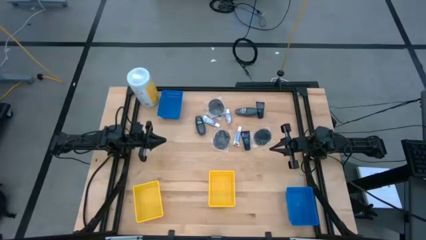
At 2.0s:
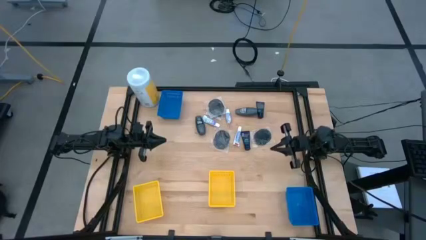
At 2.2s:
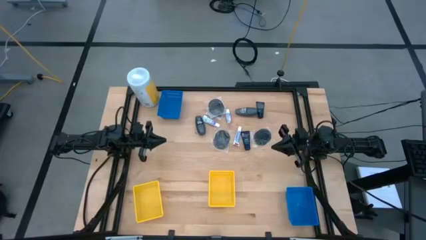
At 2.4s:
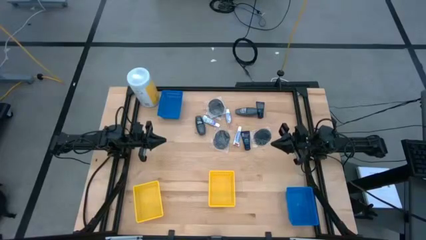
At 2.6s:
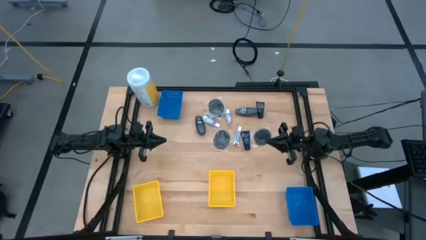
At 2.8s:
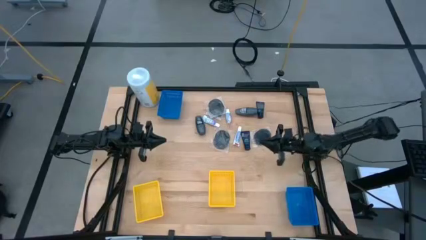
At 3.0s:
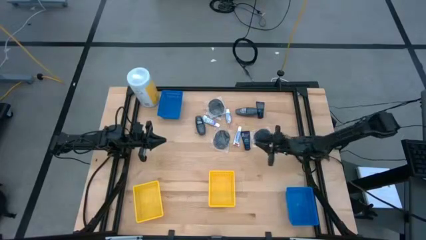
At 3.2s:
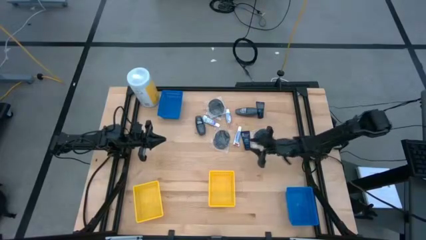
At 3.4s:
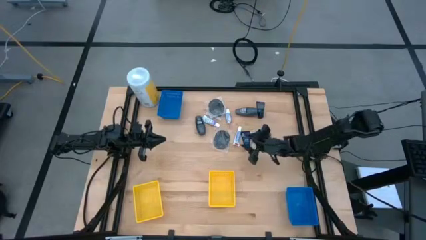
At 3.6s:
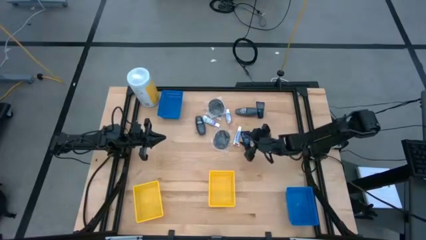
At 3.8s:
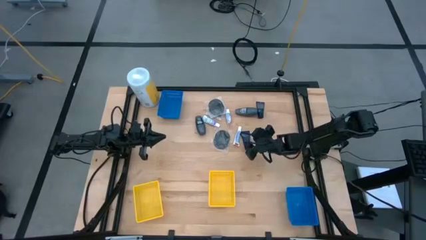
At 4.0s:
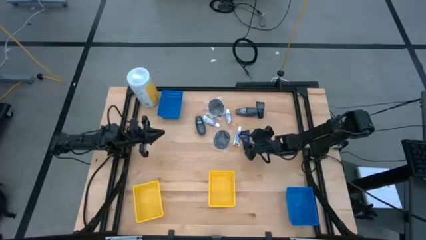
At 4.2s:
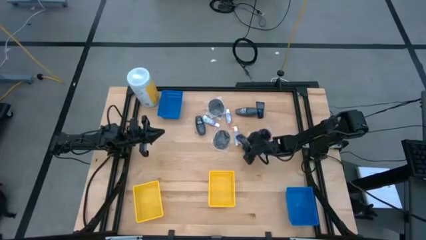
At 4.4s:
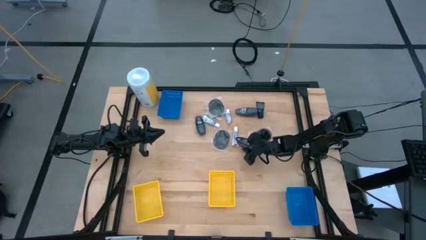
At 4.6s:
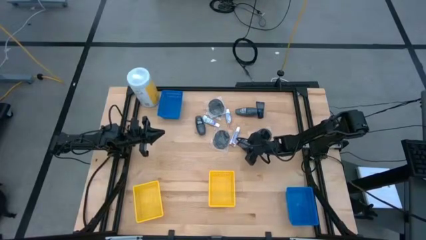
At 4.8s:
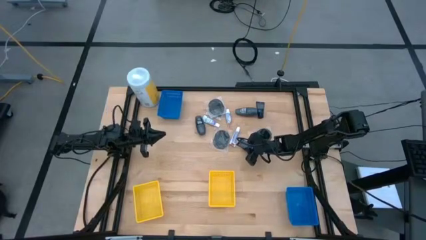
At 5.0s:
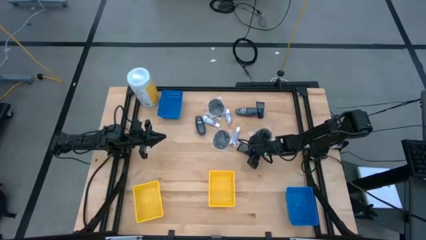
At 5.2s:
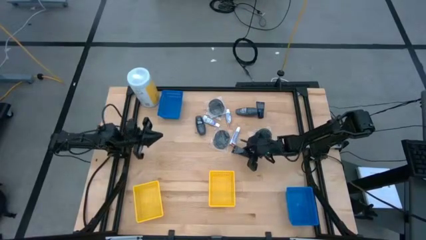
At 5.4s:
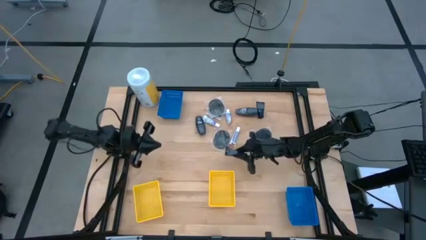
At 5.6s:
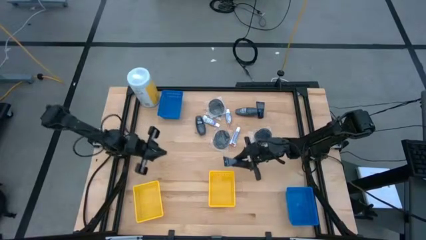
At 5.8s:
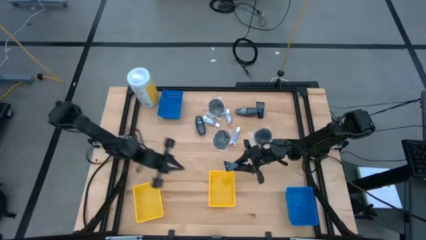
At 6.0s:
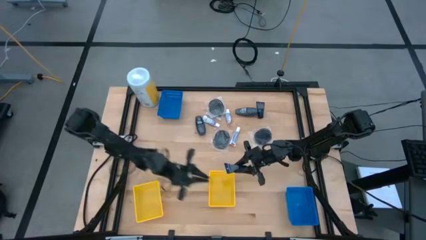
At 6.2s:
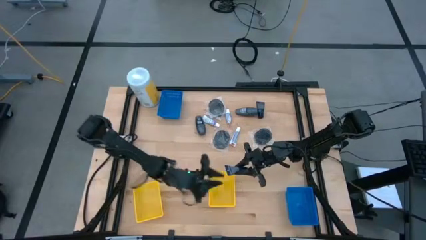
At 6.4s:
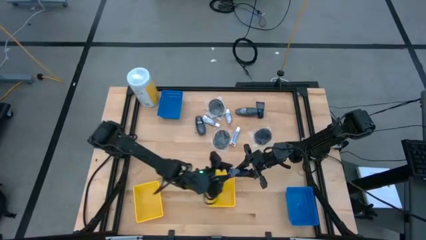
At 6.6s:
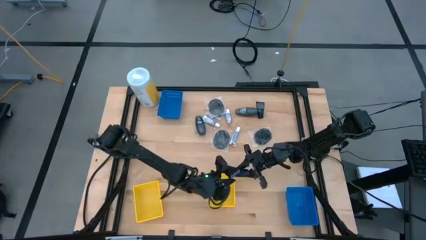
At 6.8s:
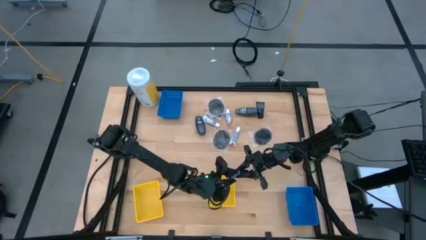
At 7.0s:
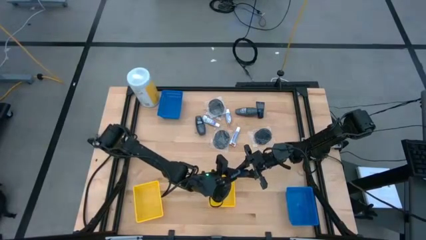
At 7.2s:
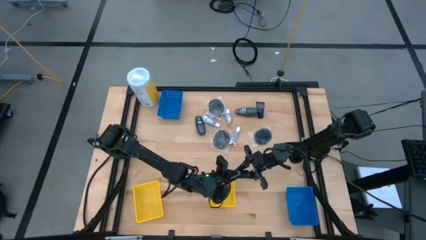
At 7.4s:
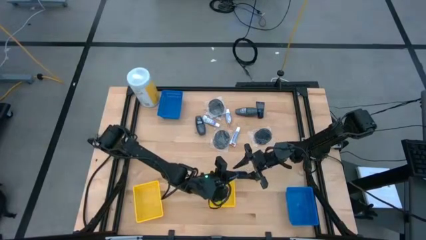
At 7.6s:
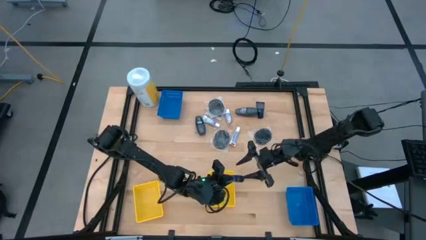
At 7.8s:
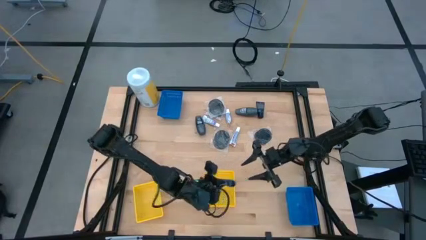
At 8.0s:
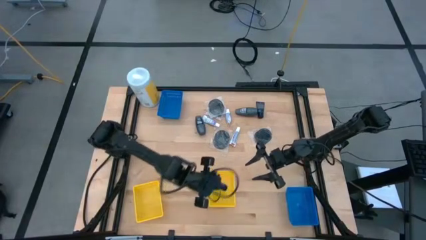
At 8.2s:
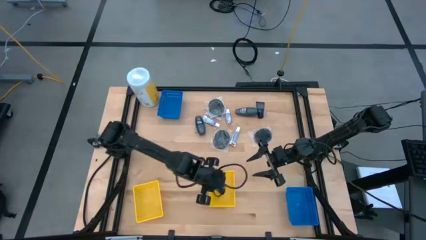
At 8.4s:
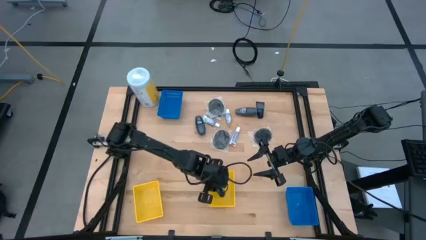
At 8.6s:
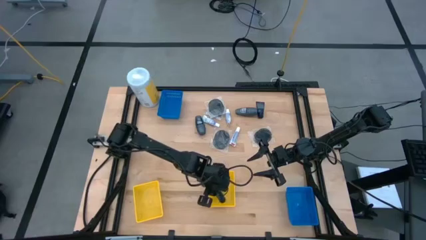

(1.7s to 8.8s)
Task: Pick & Place Travel size toiletries
Put the blue shave cream into the right yellow bin

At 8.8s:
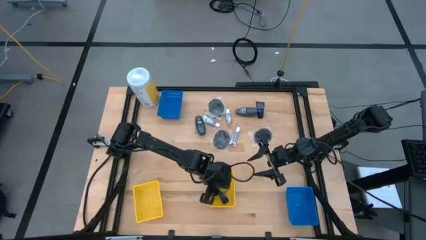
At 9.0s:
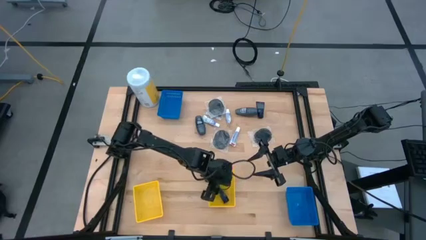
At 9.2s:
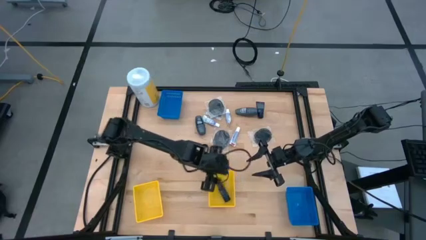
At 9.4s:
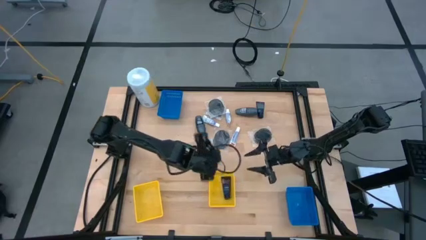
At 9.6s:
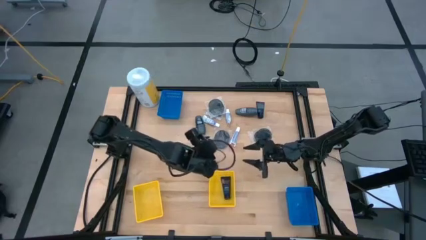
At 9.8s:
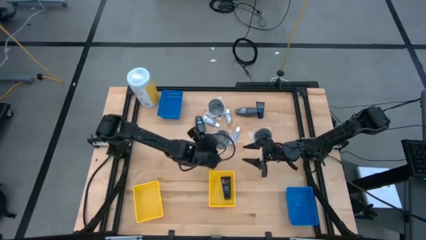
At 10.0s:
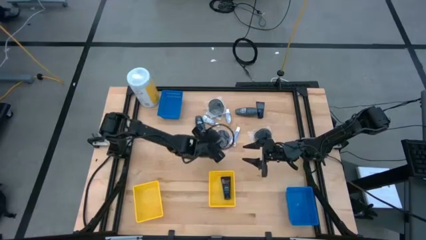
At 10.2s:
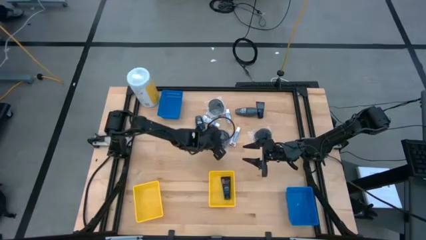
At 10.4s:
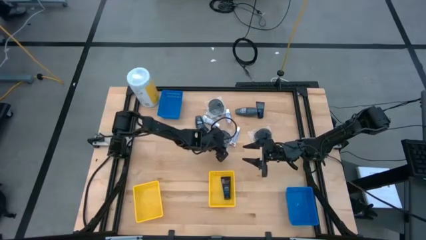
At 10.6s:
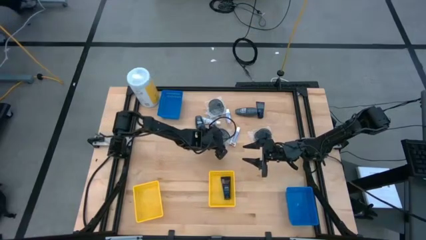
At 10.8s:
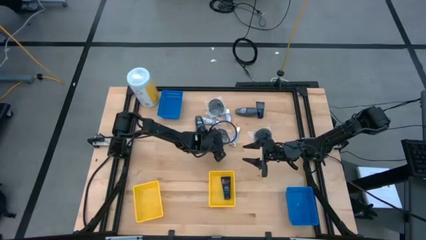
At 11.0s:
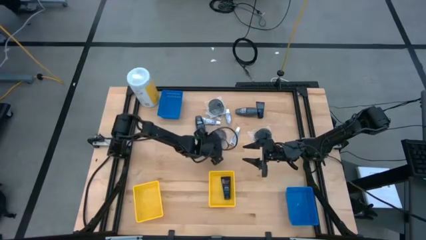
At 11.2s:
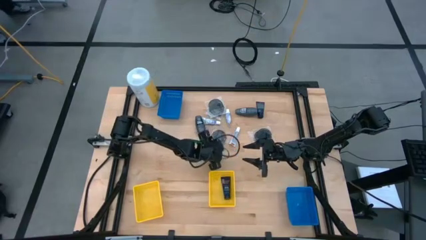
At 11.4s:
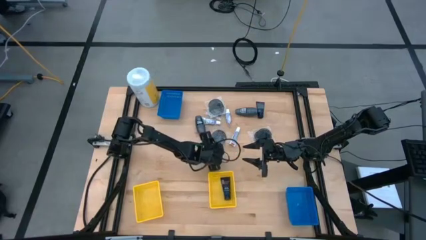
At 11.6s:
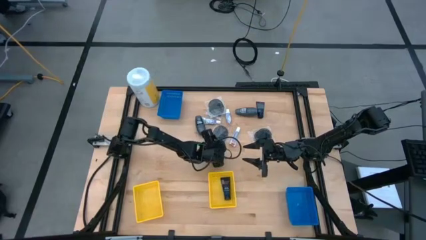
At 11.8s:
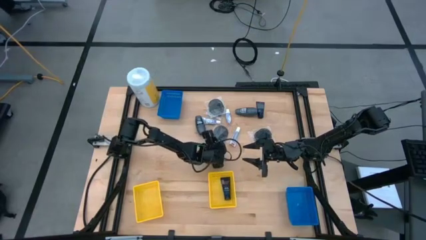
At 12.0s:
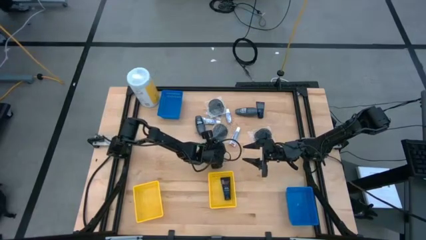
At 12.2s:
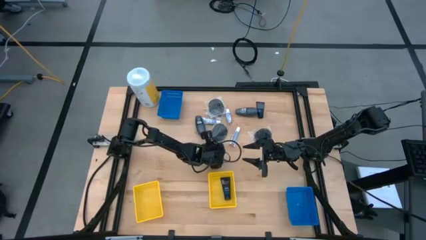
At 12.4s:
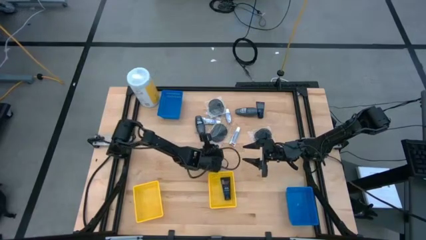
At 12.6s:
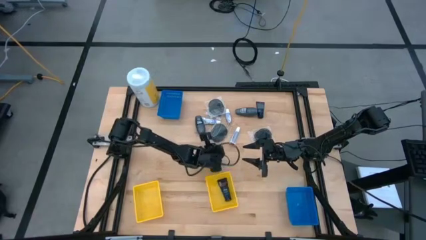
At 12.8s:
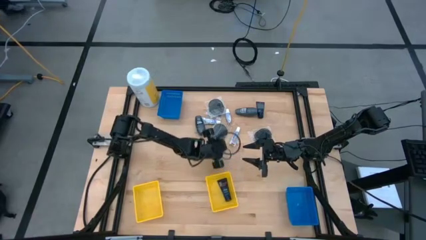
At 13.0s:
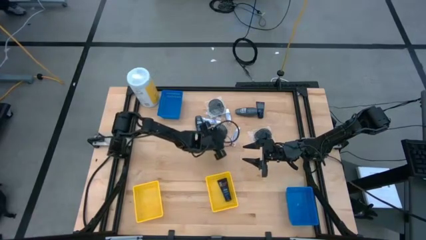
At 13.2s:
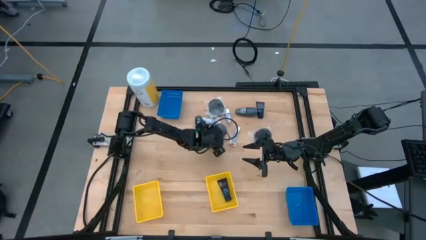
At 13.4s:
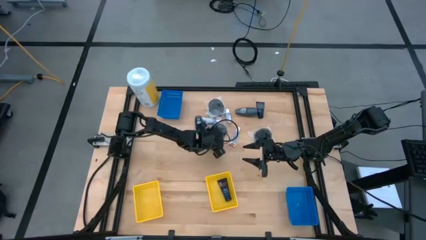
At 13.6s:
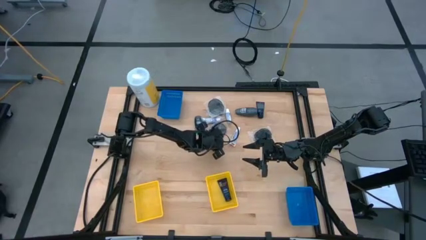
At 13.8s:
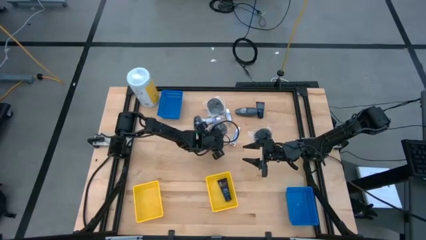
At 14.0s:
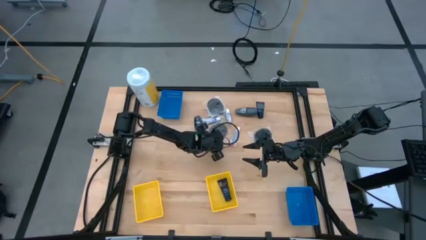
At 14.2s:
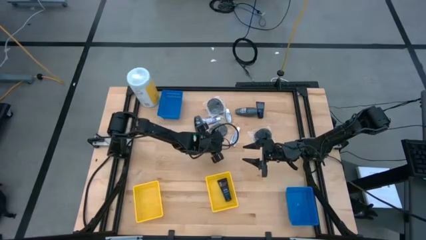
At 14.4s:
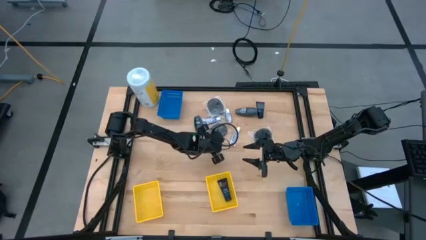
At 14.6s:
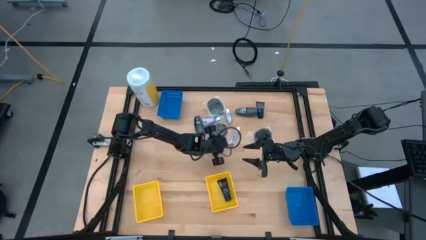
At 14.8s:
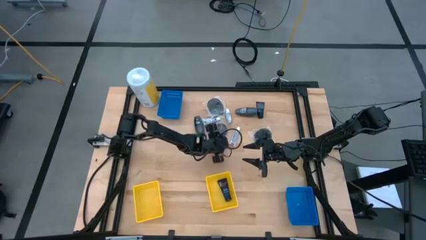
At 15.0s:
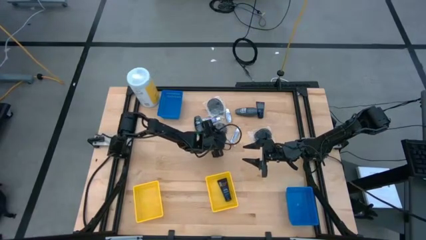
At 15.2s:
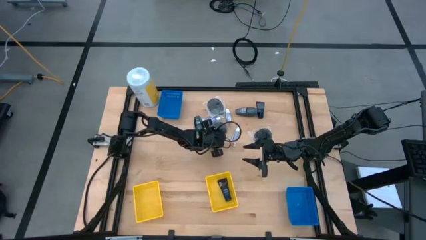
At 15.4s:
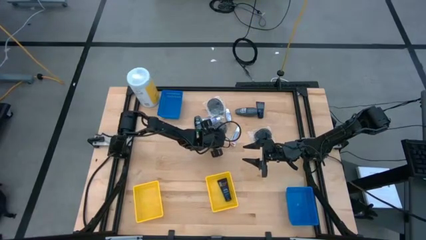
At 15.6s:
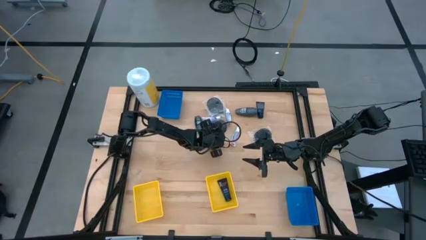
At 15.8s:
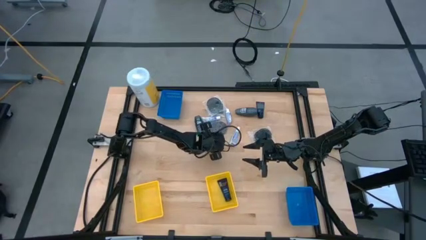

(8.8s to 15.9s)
Put the black hairbrush into the bottom blue bin

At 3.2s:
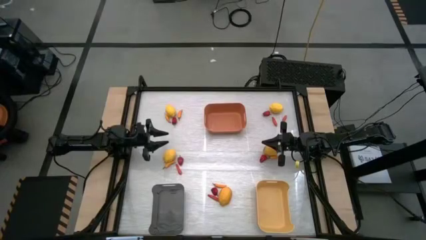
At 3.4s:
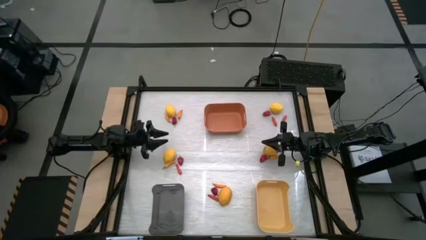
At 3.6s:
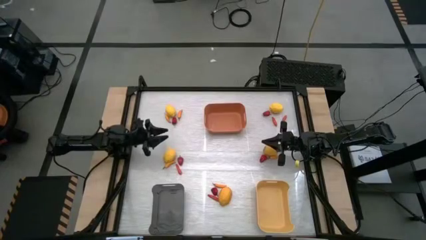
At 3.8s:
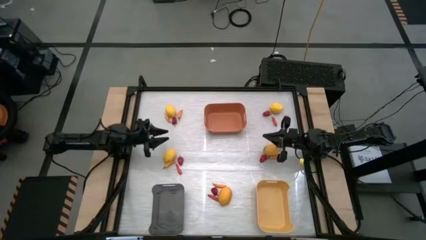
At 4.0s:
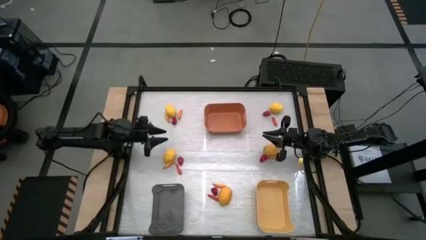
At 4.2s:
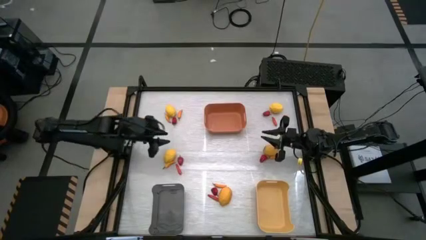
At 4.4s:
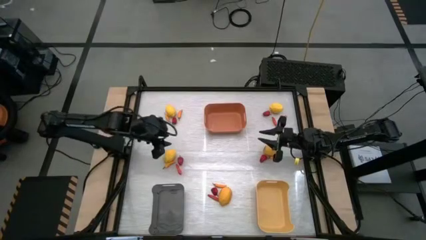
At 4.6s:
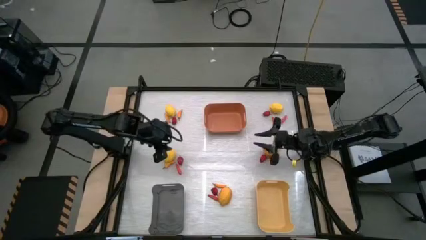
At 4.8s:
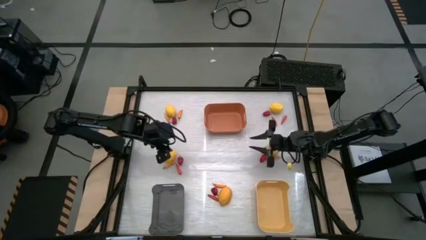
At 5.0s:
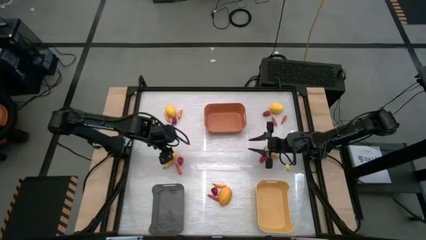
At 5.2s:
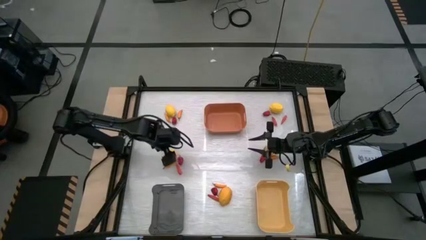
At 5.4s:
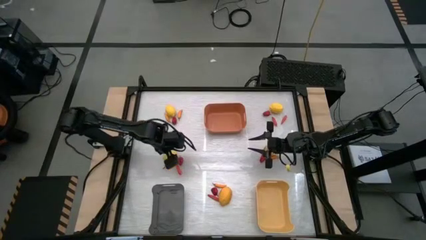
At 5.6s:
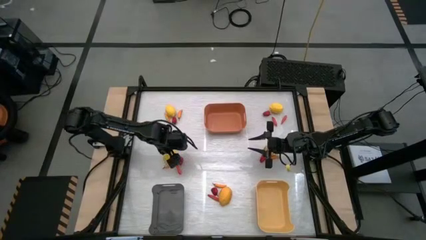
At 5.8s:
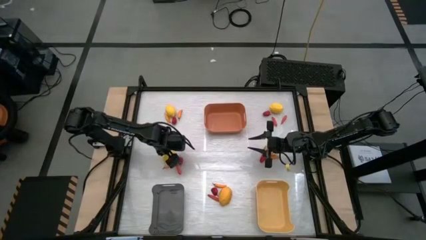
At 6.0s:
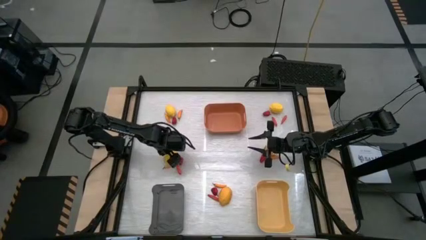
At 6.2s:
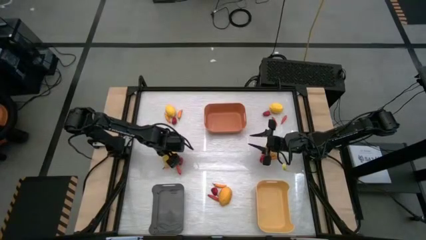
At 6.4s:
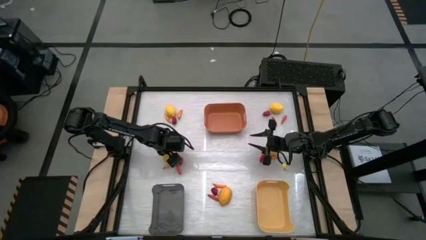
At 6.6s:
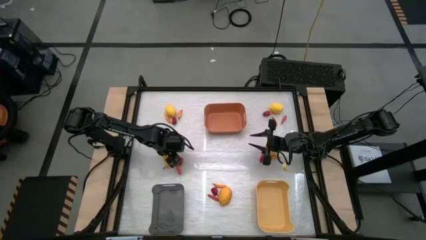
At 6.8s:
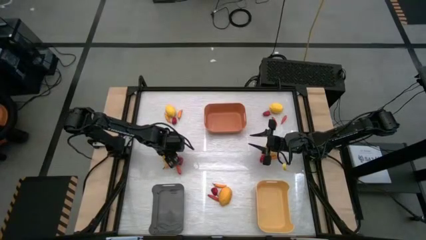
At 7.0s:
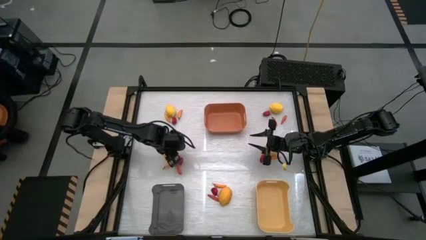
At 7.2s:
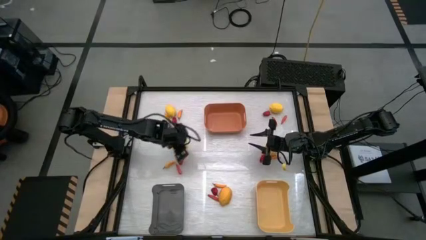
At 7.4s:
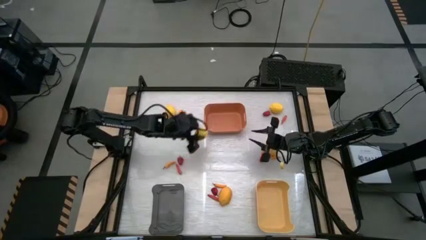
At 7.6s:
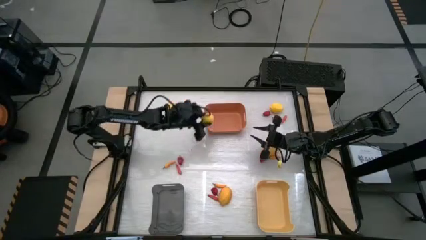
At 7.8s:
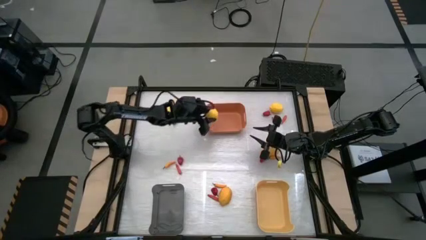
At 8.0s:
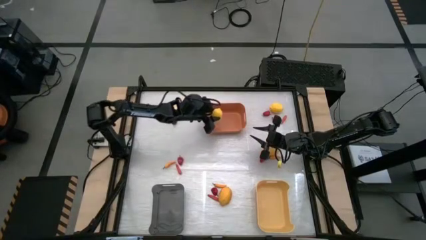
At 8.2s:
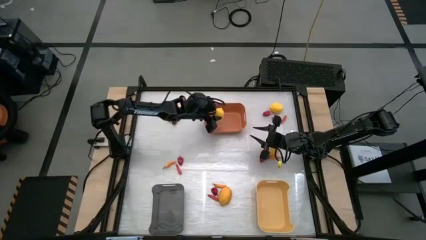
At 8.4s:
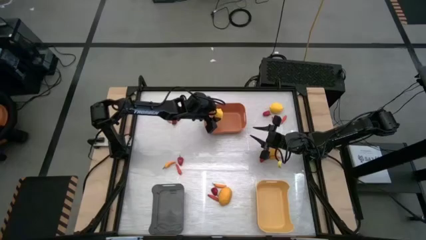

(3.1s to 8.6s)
Task: Sort produce into baskets
Put the yellow lemon into the orange bin
